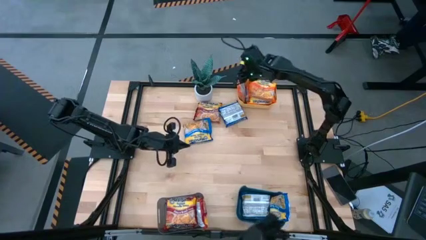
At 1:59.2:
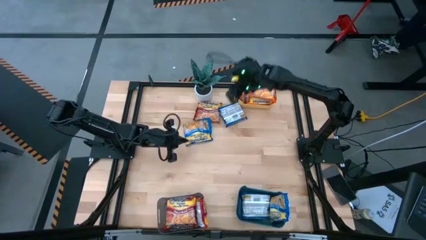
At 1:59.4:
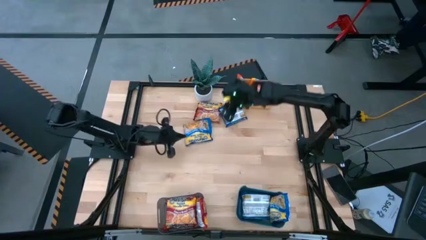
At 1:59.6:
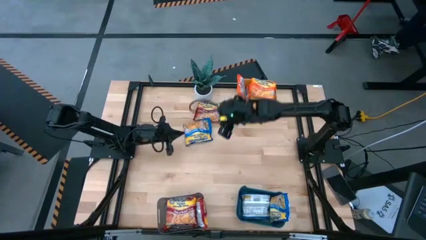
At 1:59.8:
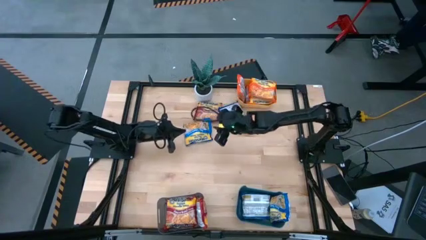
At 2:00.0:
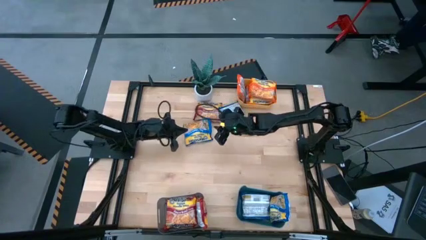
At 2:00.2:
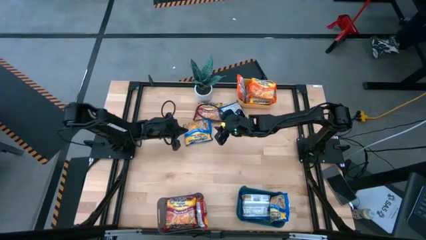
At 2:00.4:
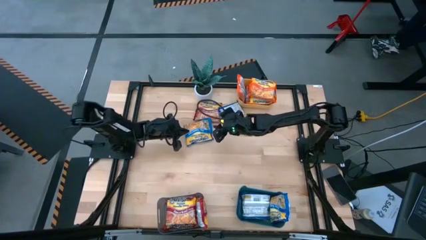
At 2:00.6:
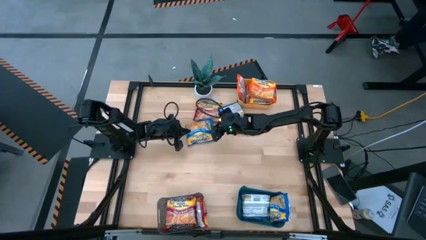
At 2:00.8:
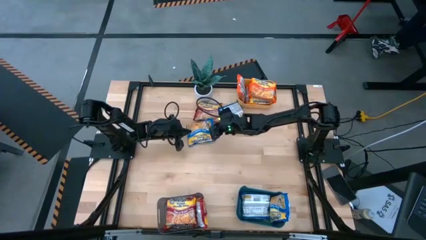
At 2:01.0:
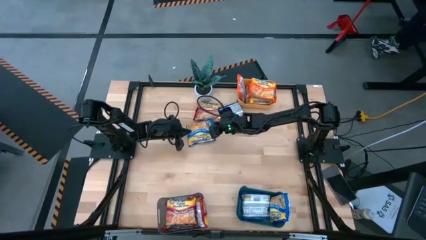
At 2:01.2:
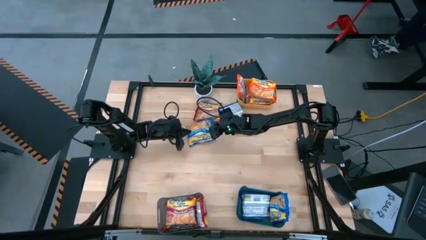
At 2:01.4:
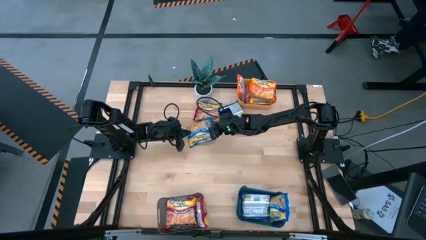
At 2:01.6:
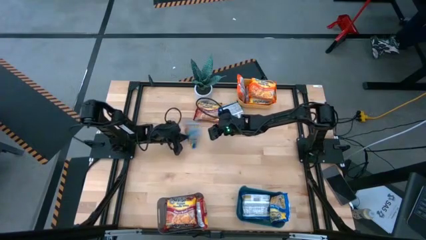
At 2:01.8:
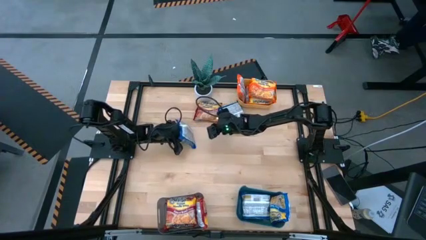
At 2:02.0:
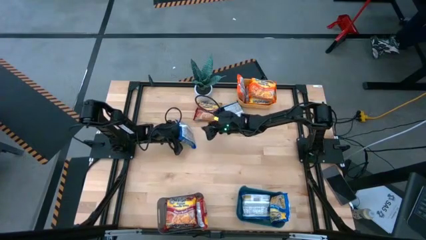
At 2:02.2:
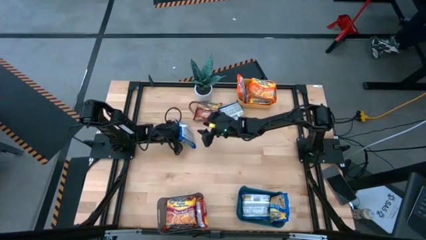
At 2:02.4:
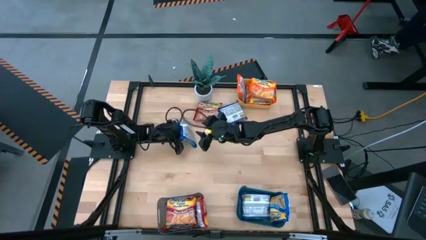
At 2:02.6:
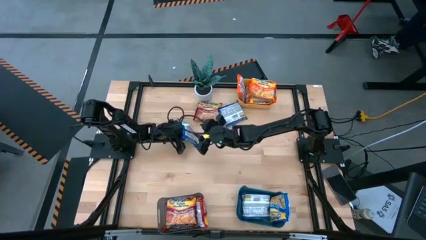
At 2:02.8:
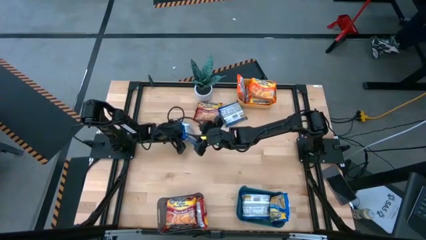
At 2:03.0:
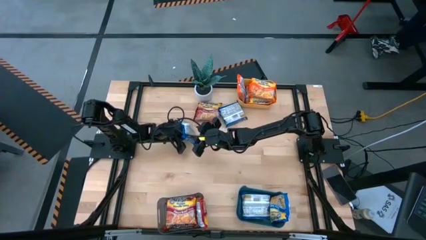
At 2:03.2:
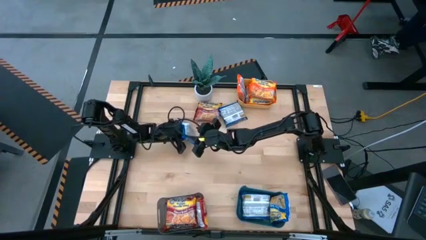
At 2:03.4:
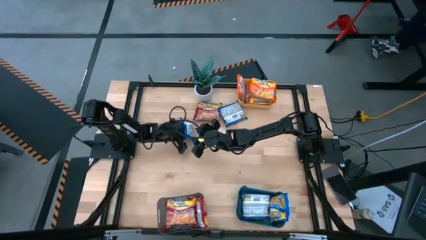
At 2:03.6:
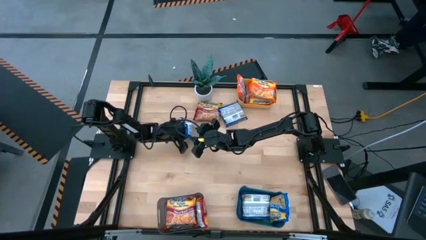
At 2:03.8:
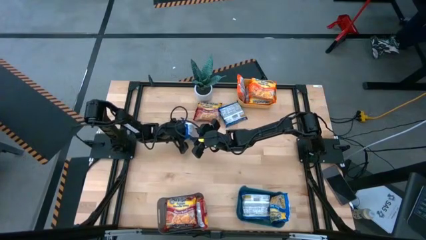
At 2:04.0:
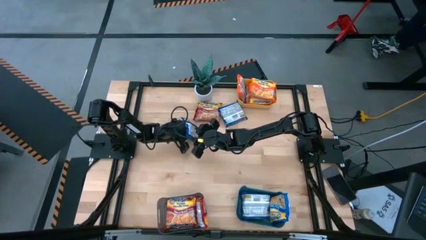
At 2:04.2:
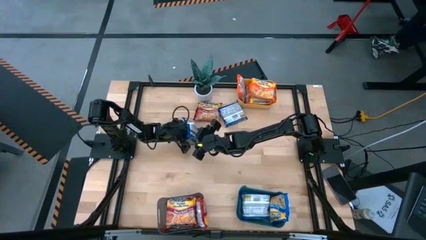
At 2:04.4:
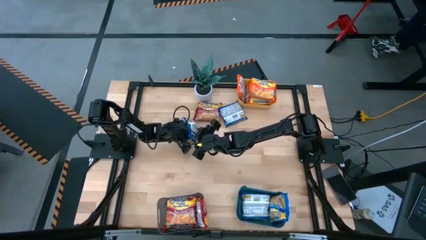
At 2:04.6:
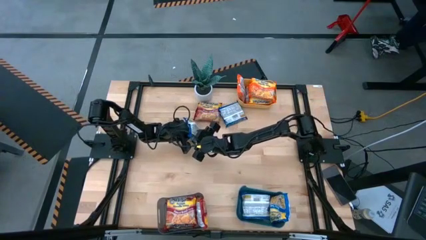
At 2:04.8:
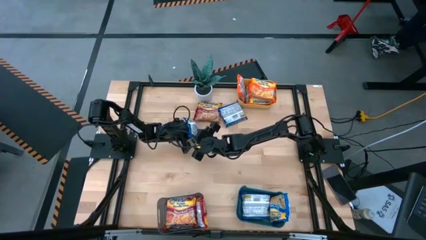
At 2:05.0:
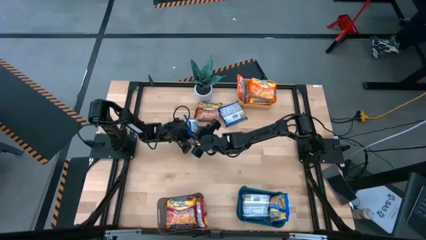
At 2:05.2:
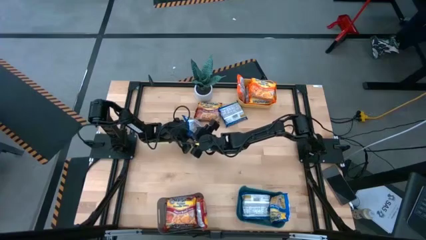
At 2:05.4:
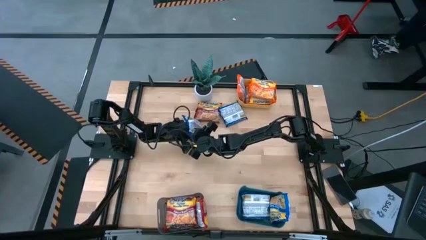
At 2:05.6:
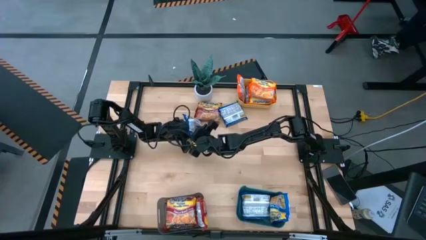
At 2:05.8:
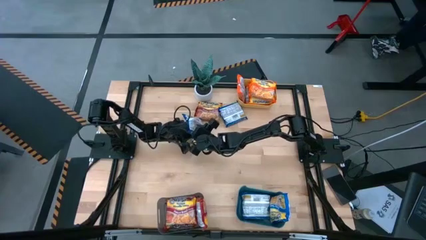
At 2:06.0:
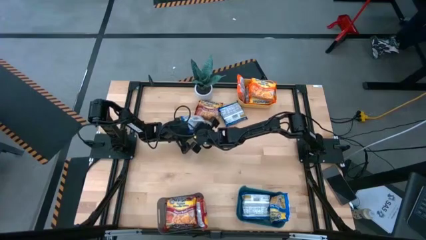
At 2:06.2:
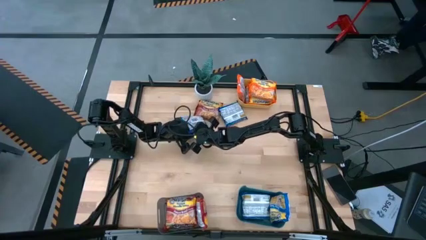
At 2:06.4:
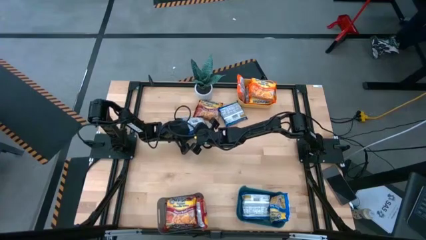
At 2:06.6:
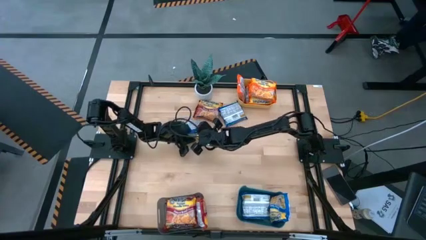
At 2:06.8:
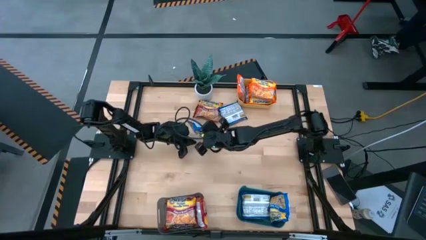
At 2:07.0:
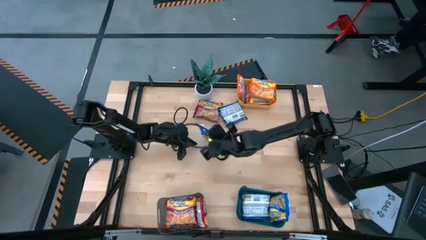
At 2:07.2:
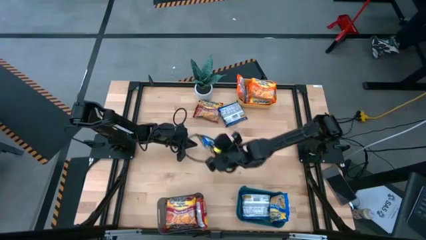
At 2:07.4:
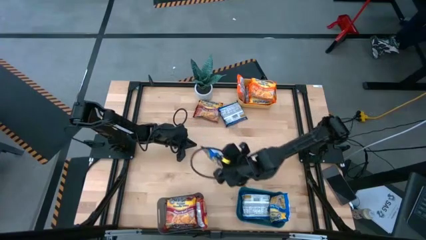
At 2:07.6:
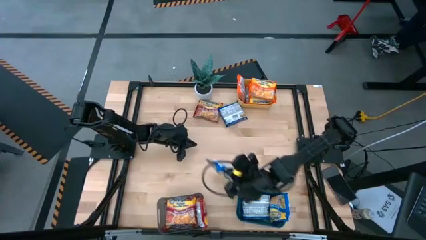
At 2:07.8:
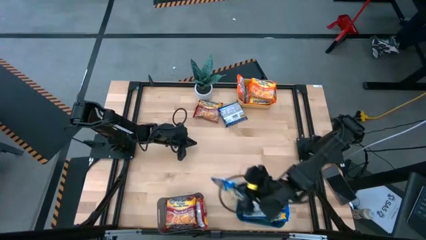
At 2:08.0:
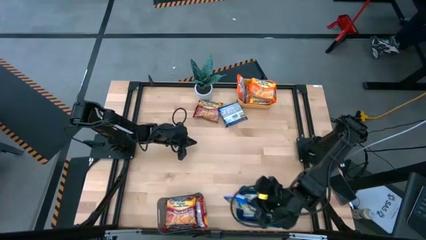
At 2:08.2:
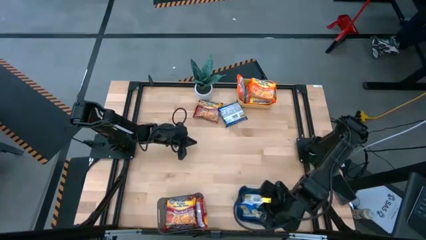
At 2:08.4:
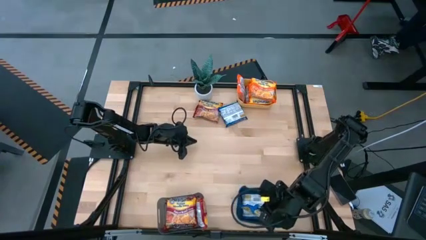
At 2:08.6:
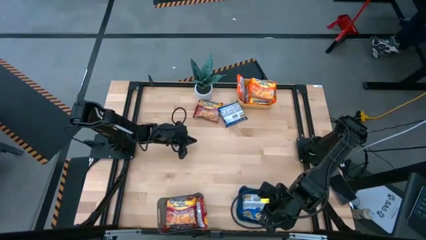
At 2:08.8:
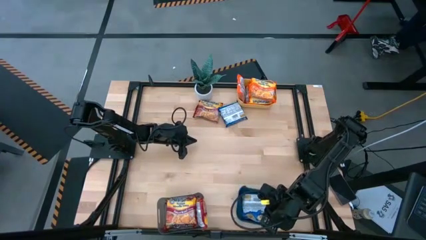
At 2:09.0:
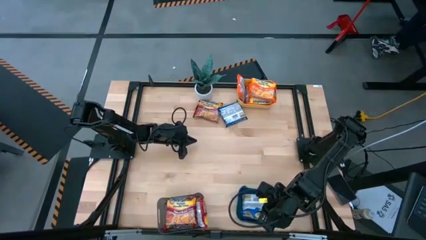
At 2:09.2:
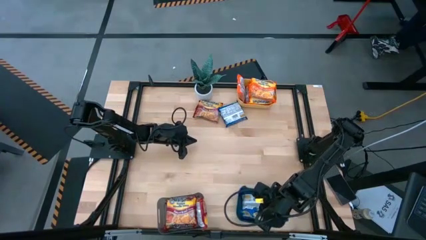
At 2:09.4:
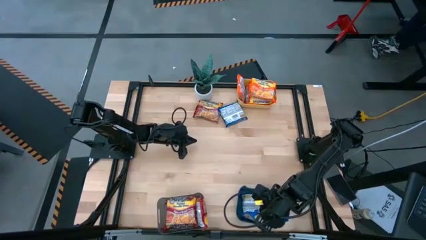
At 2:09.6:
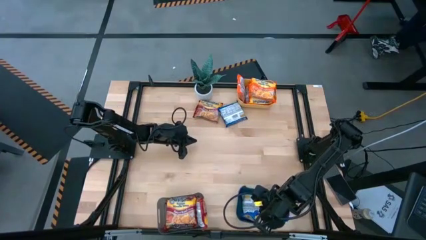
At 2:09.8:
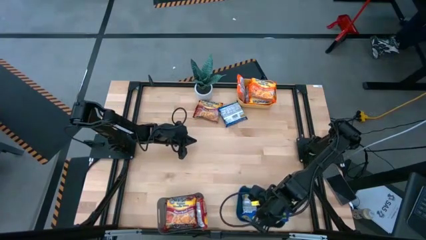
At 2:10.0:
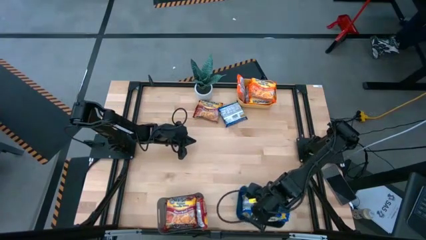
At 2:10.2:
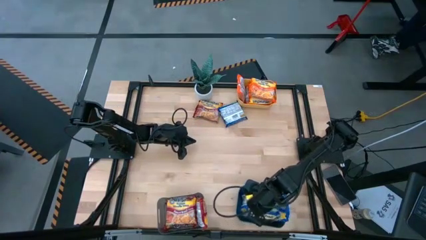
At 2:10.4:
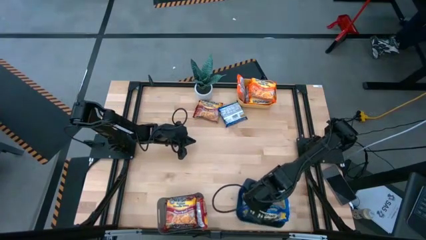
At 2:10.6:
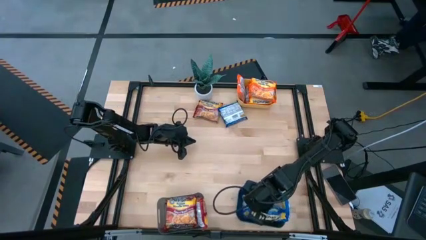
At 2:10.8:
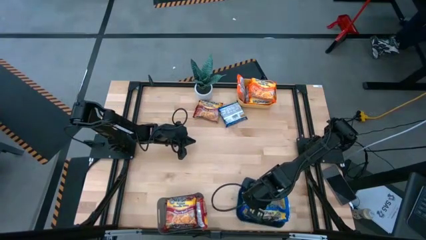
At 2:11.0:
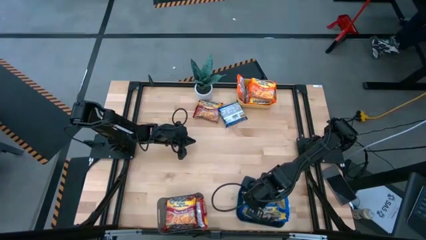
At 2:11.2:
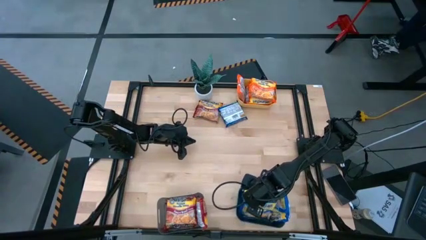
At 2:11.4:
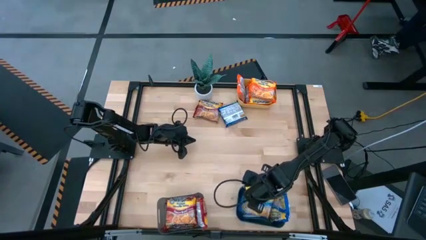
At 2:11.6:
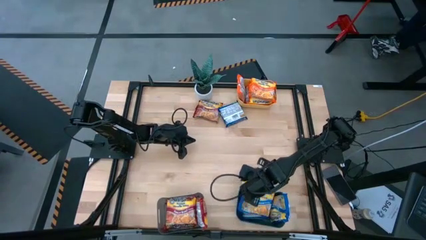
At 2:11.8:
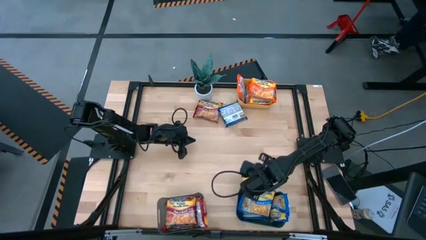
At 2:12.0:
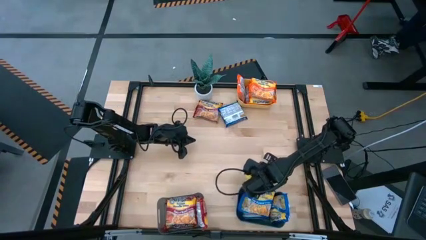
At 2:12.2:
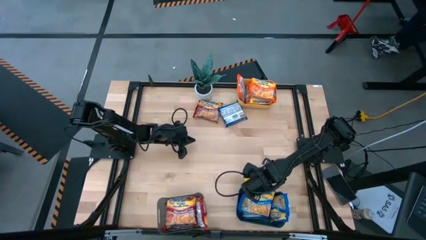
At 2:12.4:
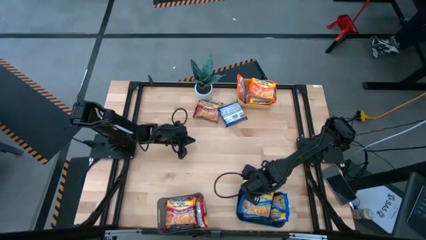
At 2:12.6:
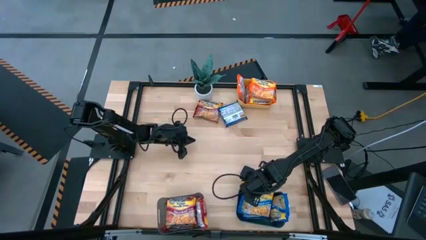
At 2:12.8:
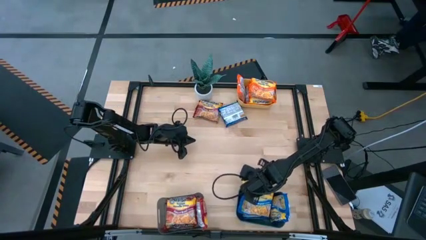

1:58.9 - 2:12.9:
Task: Sort Maruchan noodles
Put the blue noodle pack into the blue bin
